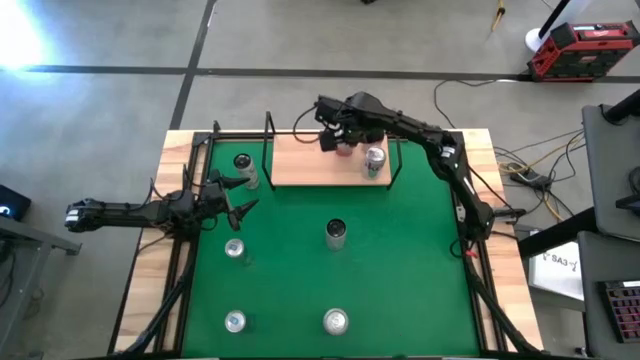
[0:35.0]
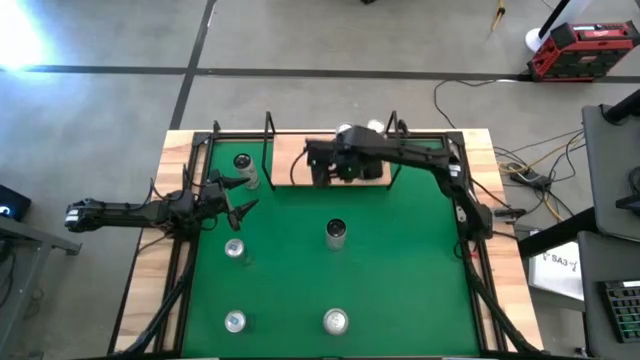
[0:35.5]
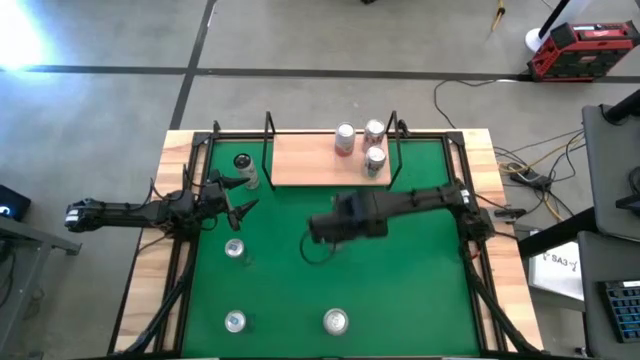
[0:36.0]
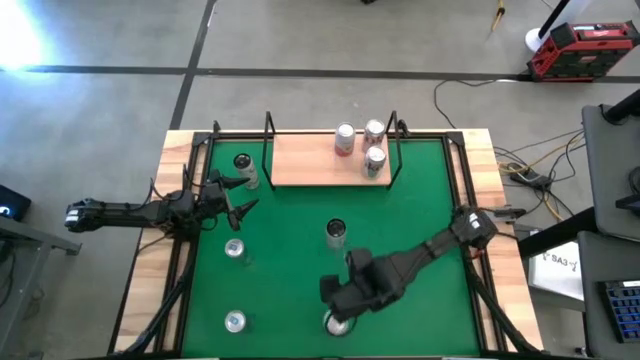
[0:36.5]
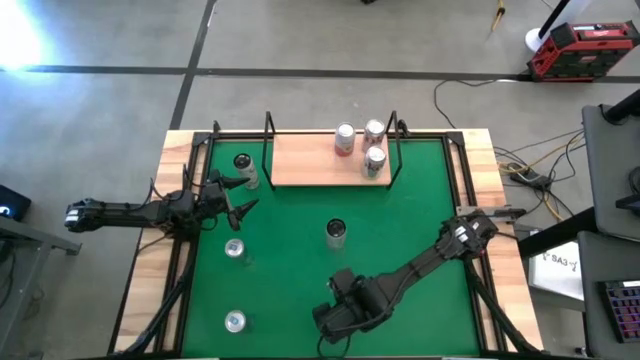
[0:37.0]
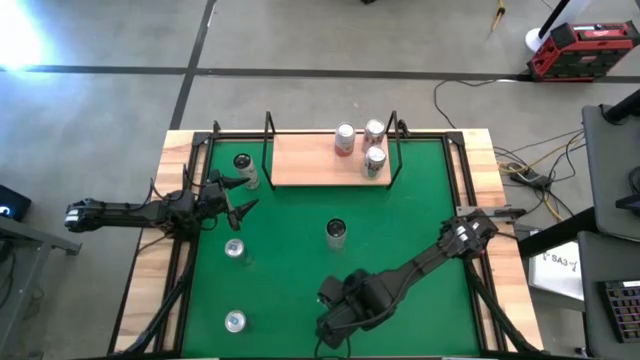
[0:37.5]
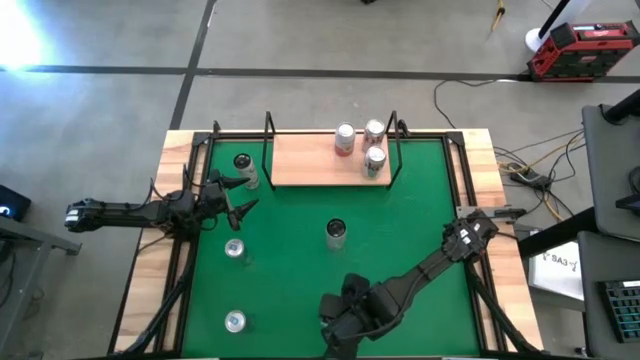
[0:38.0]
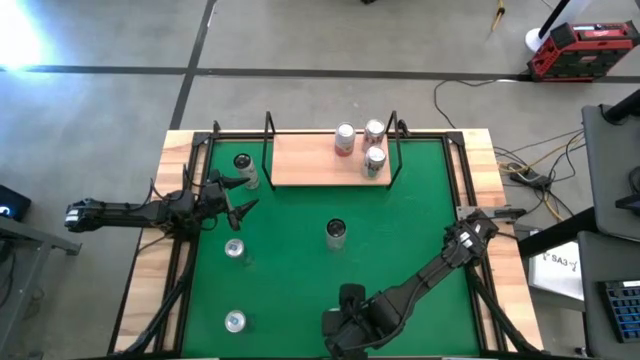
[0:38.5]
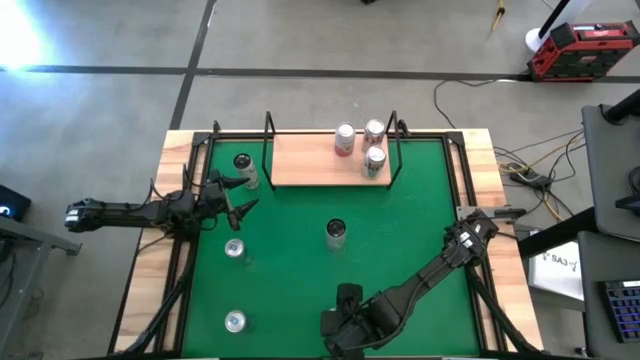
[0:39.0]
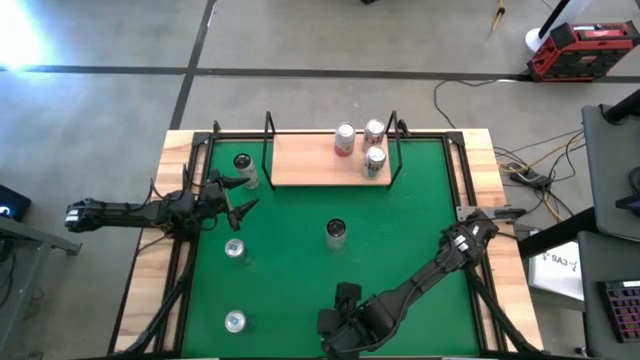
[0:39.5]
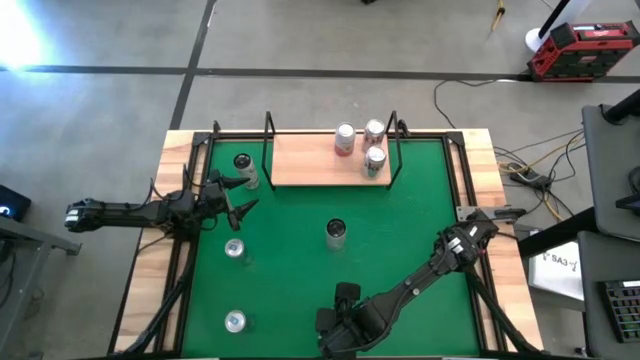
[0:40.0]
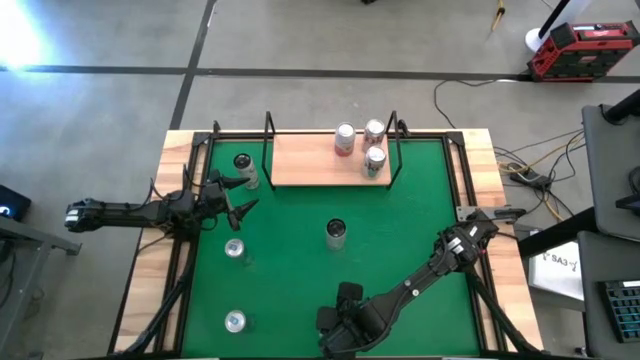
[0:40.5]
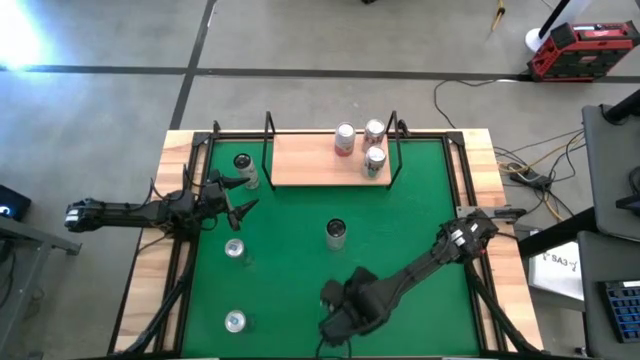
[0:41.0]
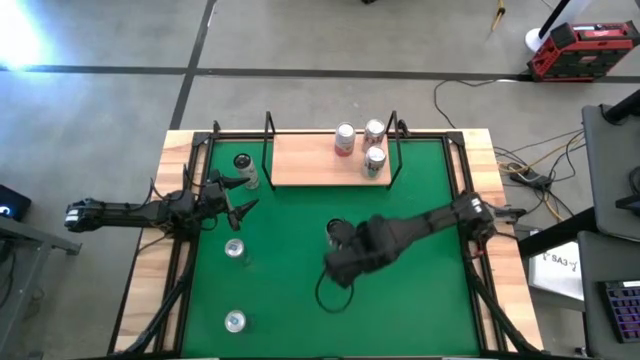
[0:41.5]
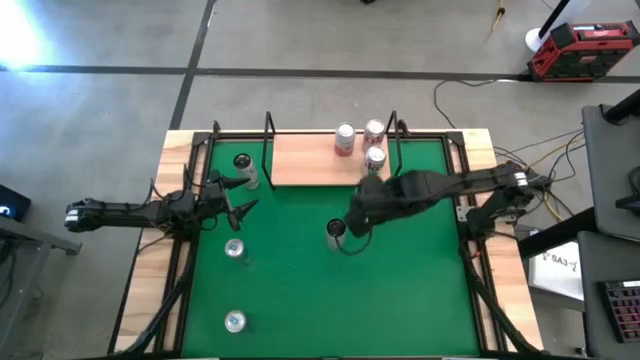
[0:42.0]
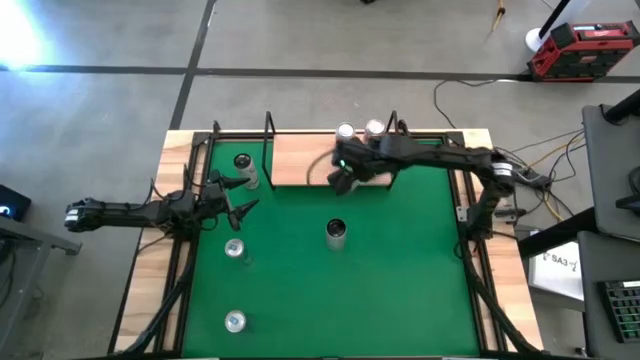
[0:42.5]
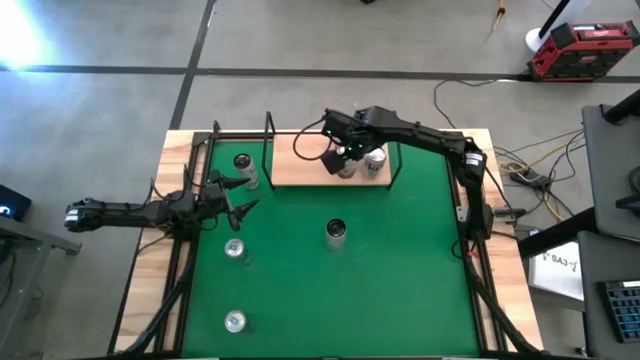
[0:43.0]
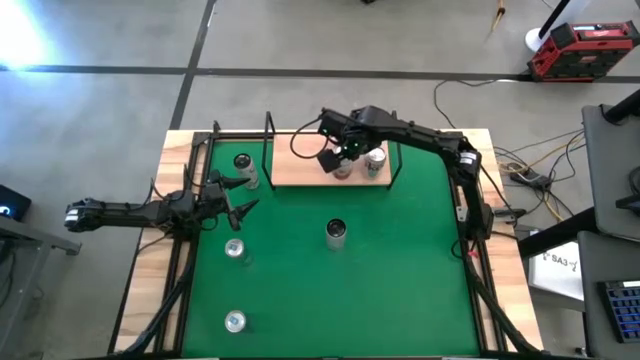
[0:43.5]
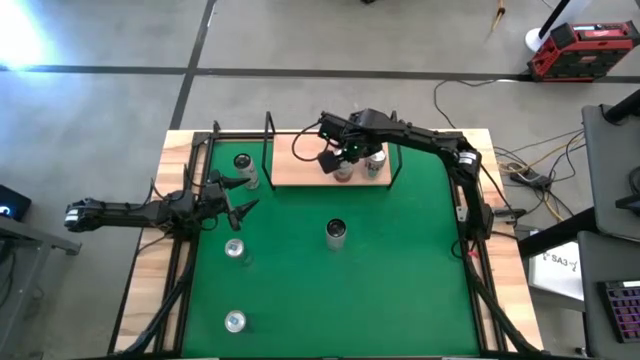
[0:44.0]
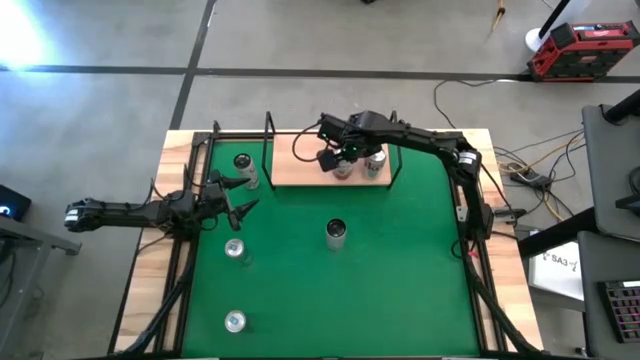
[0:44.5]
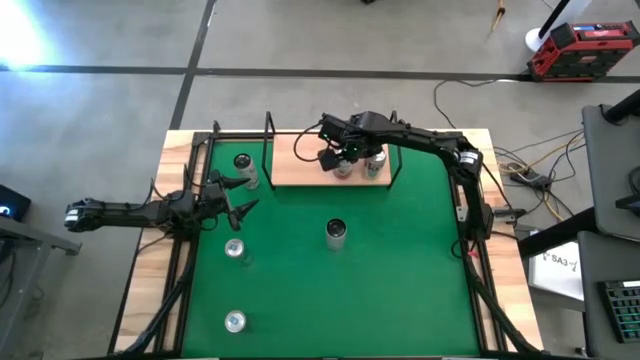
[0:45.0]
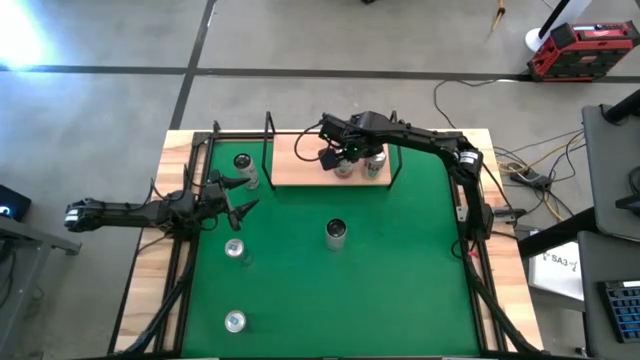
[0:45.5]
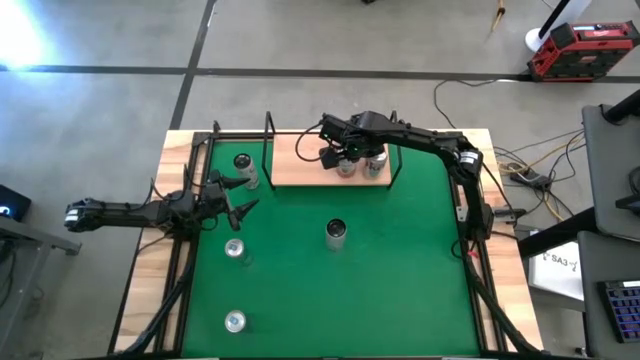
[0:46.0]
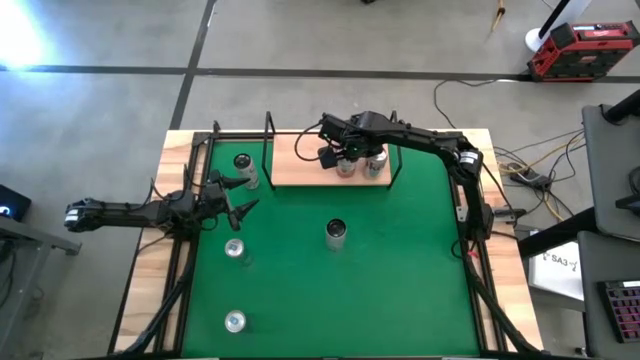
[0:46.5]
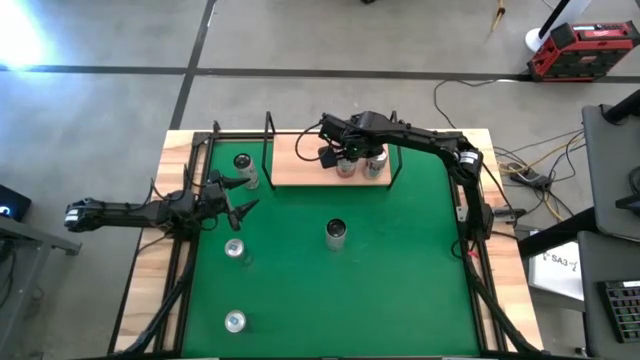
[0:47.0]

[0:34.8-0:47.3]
Task: Place canned beverage on shelf
Put the white and orange soda can on the shelf aligned with the other white and orange soda can

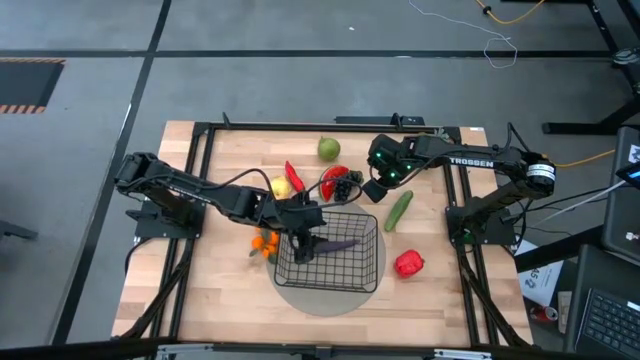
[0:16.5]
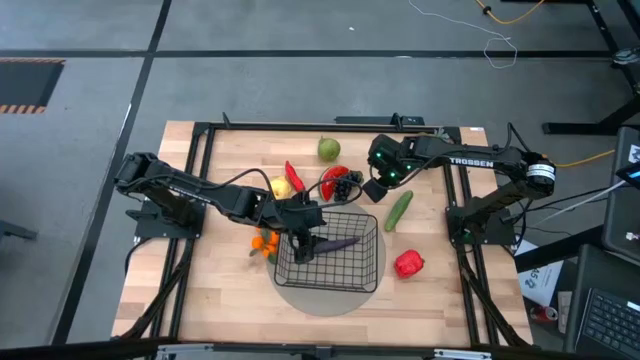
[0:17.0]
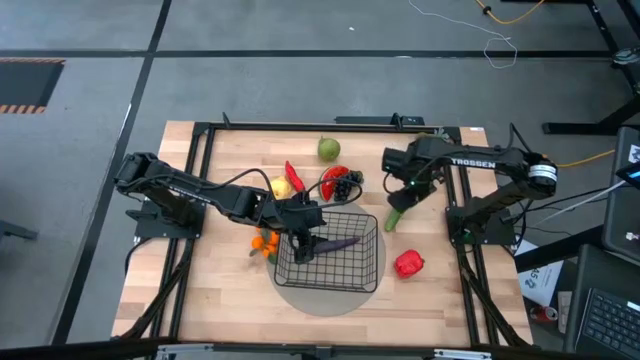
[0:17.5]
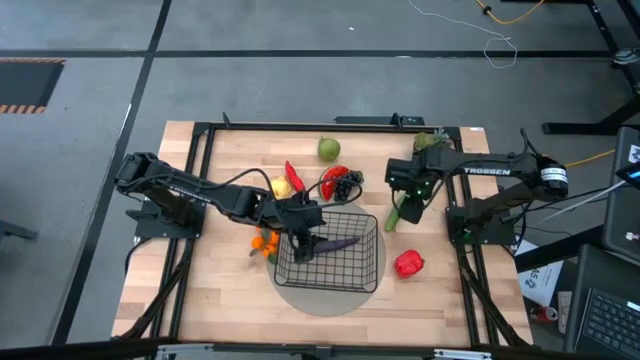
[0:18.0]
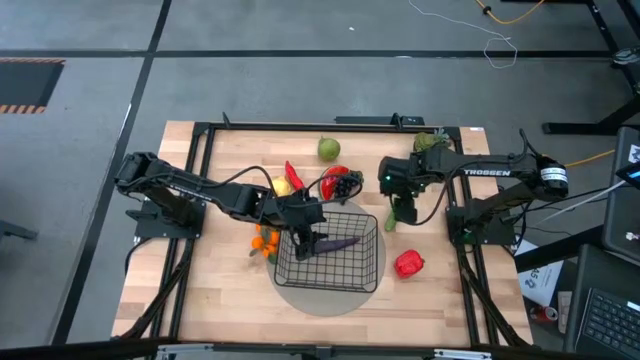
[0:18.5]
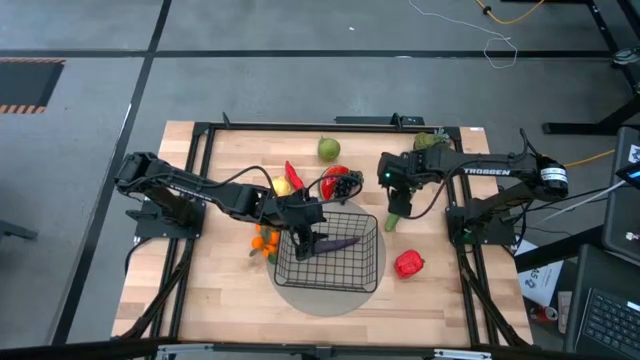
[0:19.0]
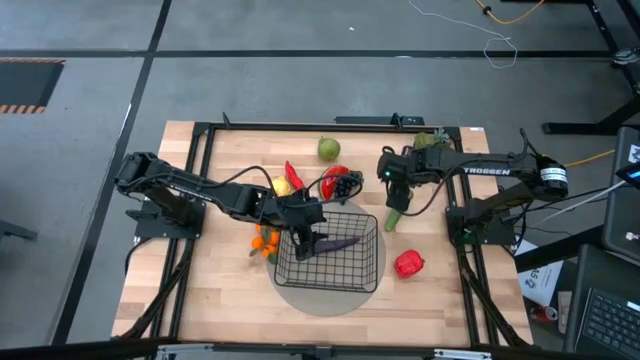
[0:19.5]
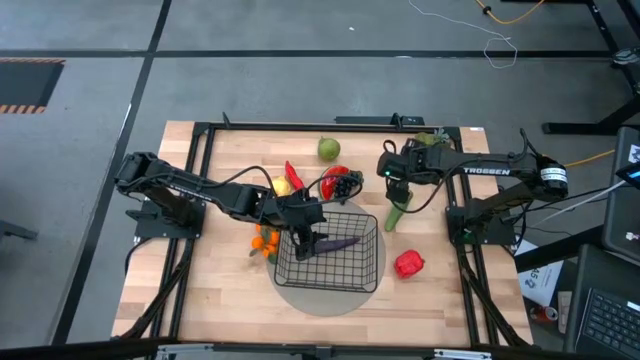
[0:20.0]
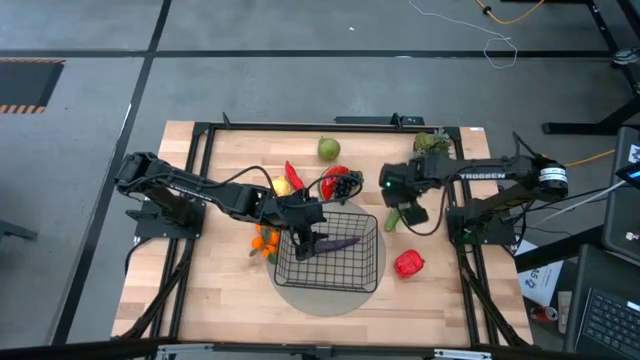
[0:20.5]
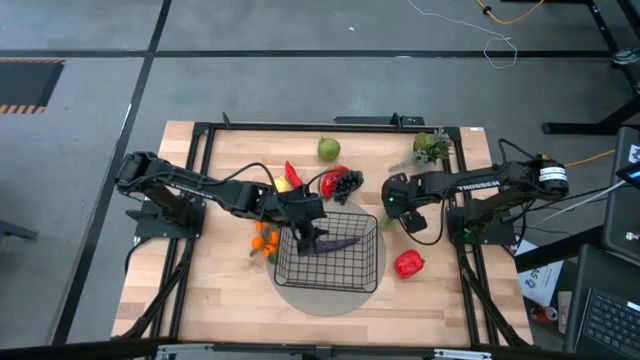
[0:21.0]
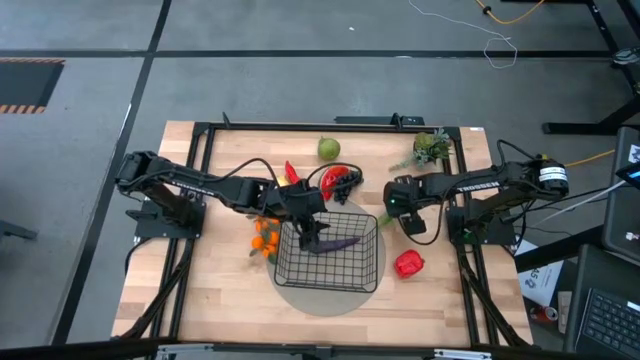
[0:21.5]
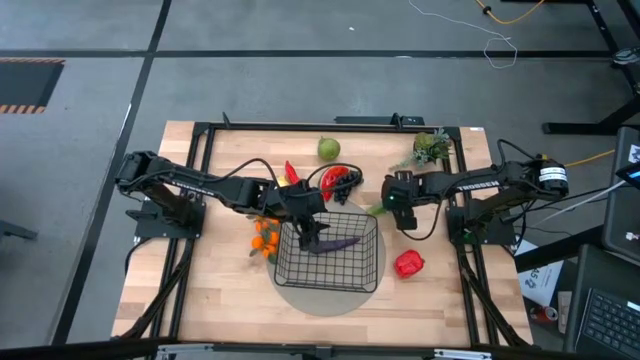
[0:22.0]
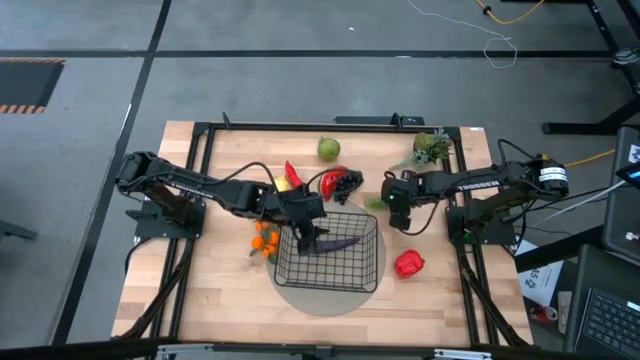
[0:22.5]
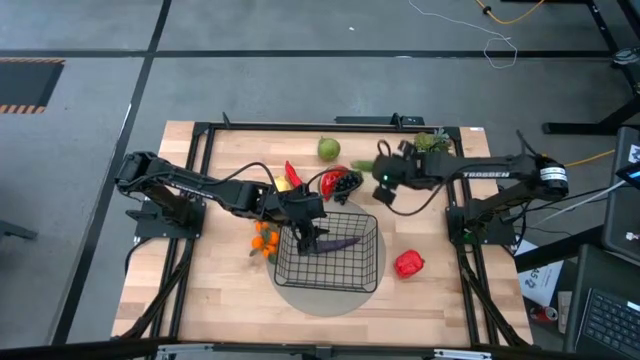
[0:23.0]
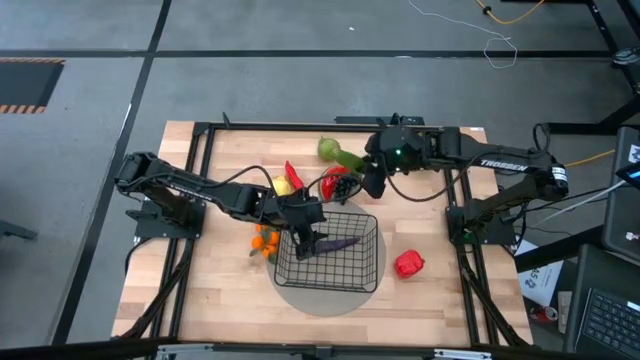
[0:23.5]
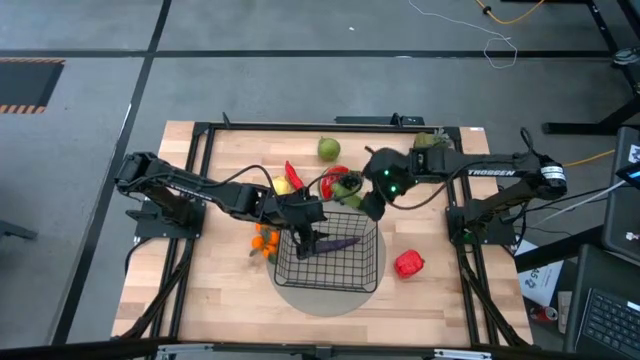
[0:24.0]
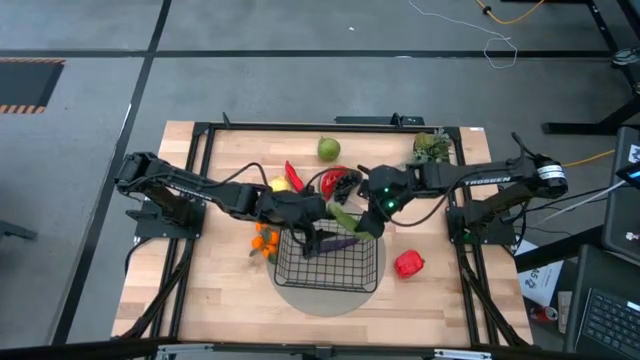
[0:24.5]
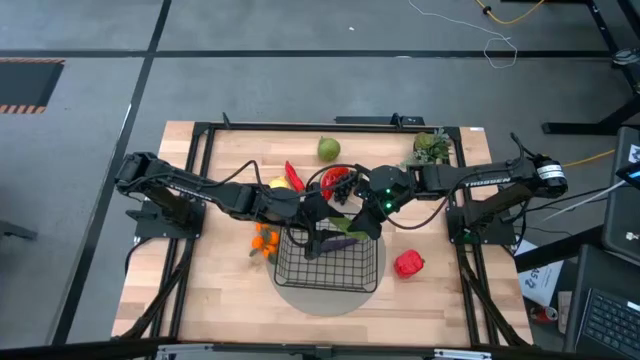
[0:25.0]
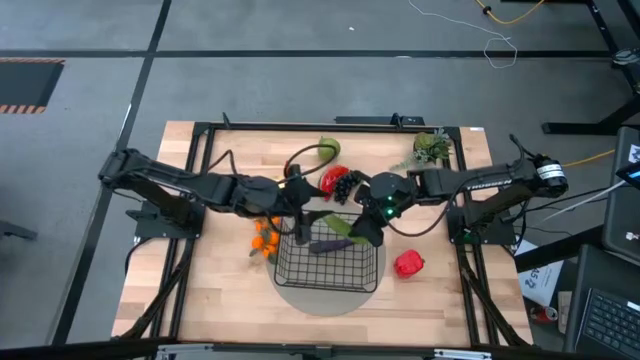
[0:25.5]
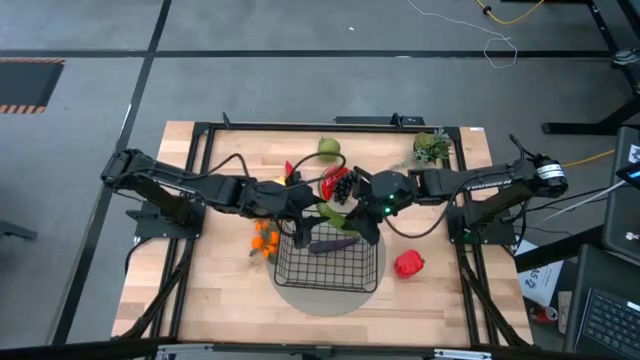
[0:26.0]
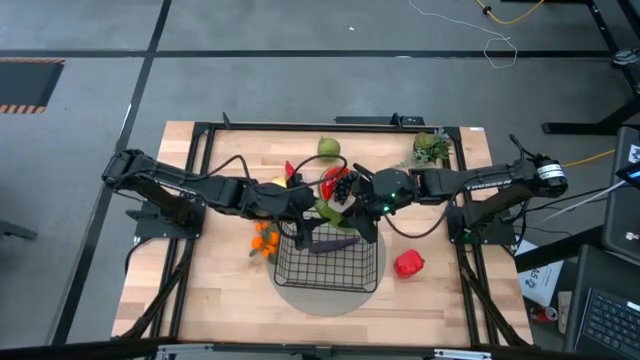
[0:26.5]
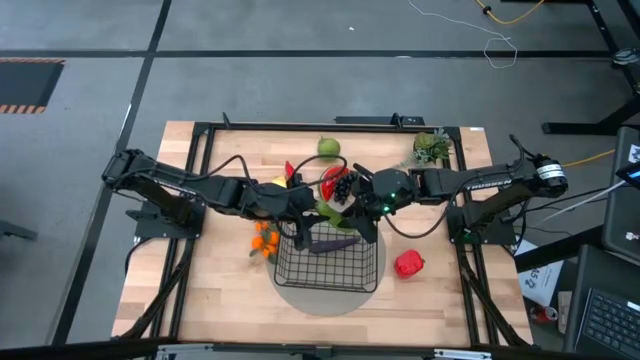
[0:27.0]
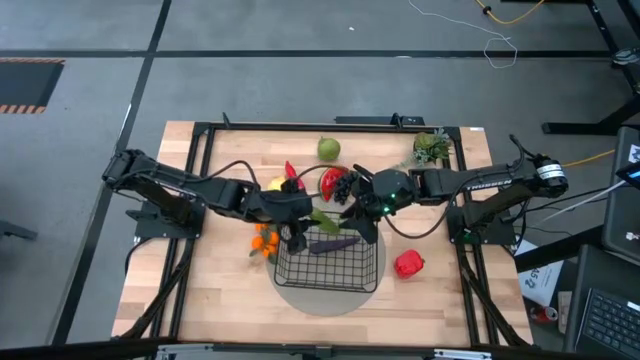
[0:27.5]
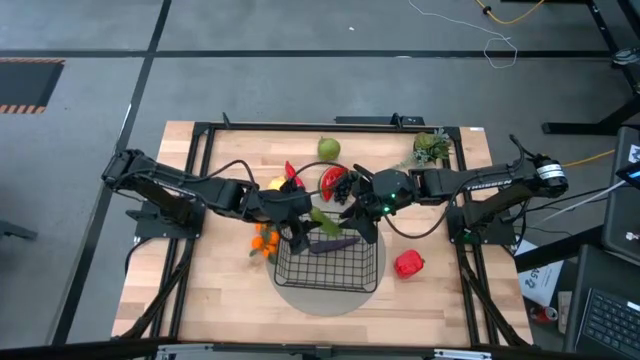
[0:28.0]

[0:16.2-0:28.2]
Task: Build produce basket
Put the green cucumber into the black wire basket
